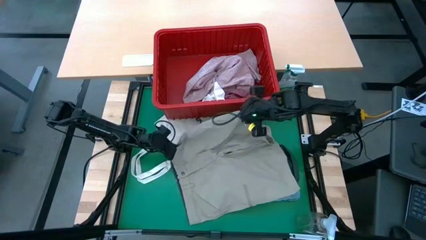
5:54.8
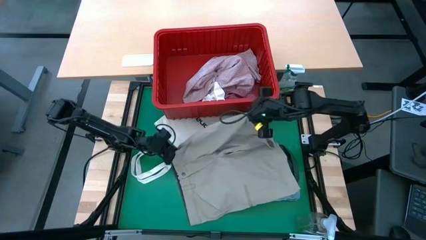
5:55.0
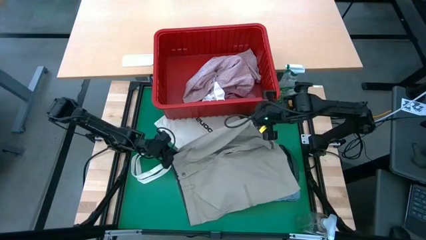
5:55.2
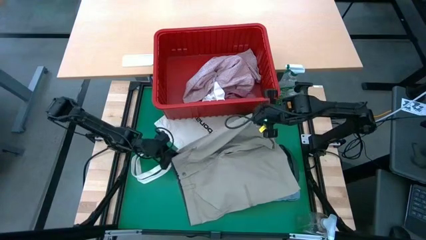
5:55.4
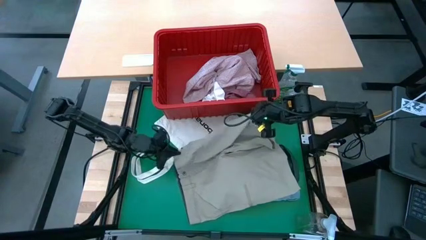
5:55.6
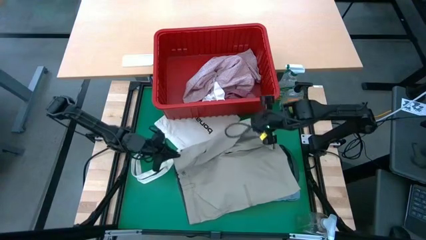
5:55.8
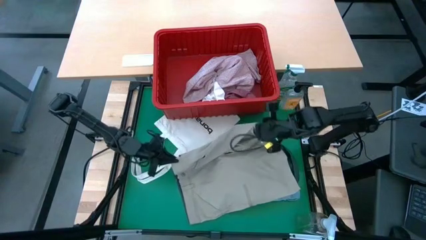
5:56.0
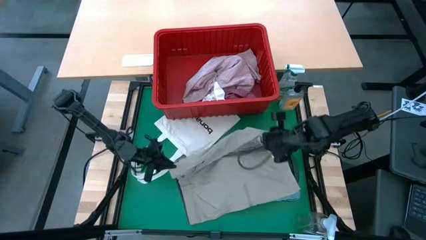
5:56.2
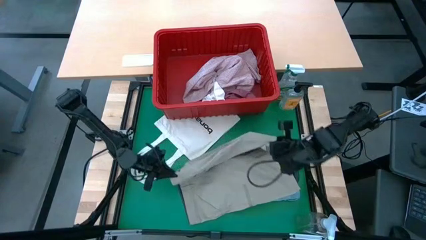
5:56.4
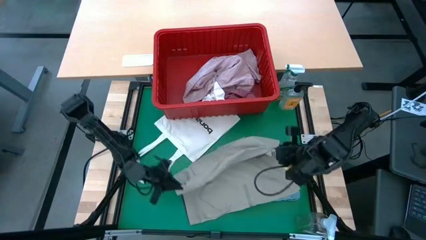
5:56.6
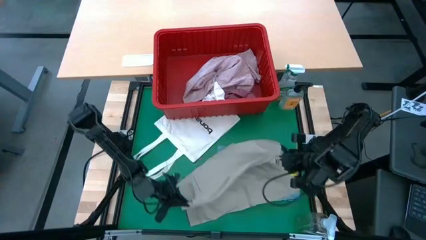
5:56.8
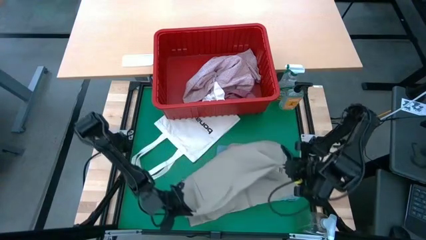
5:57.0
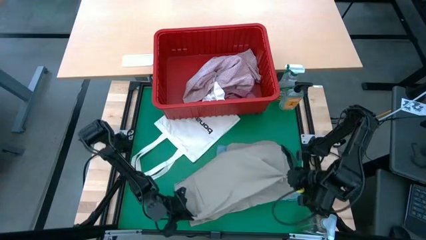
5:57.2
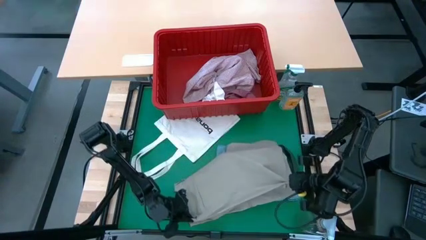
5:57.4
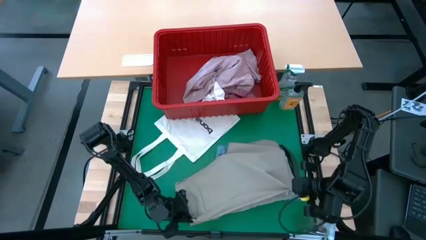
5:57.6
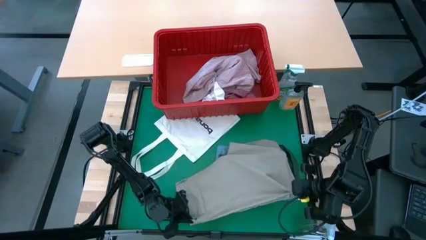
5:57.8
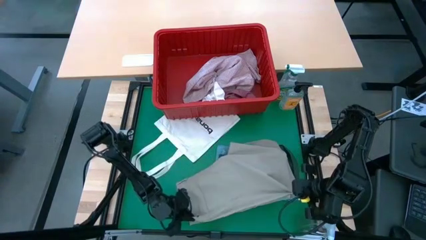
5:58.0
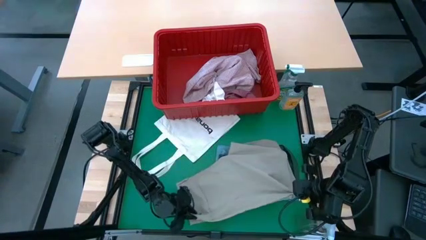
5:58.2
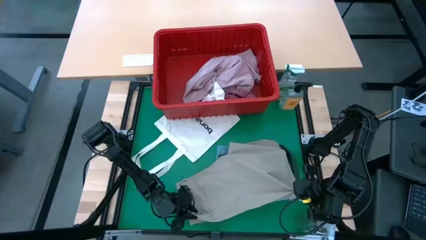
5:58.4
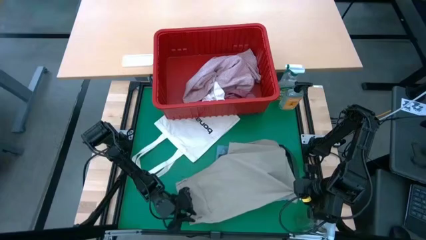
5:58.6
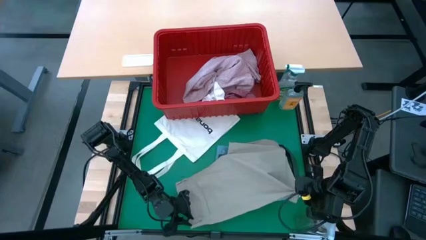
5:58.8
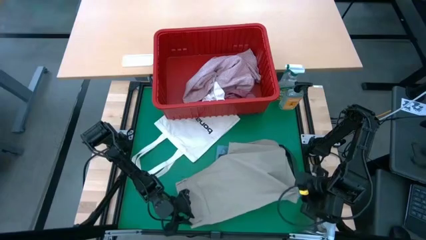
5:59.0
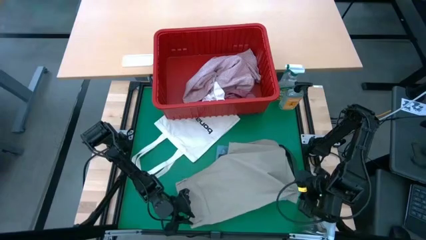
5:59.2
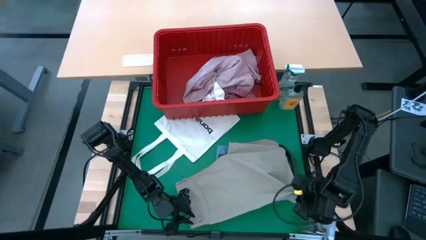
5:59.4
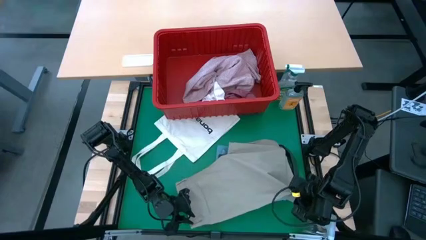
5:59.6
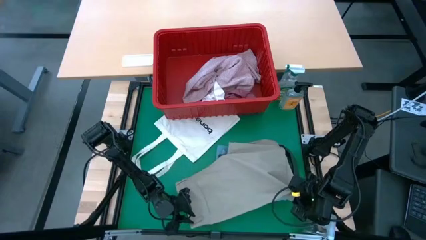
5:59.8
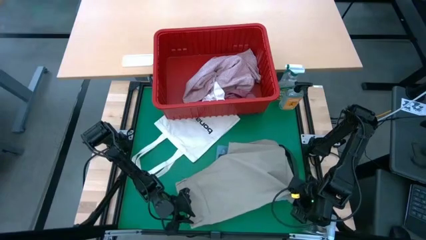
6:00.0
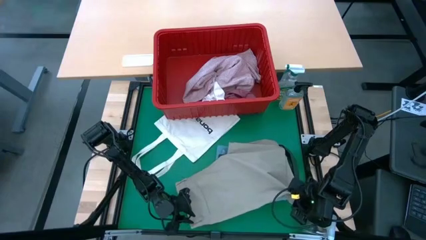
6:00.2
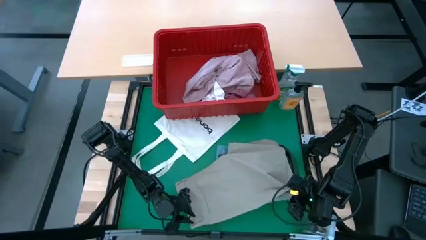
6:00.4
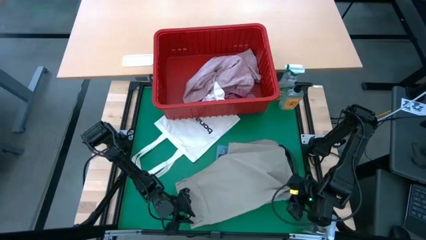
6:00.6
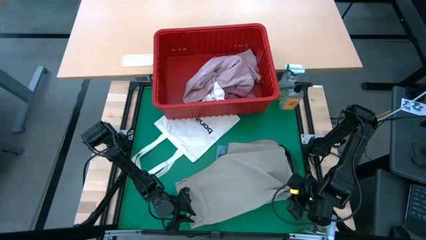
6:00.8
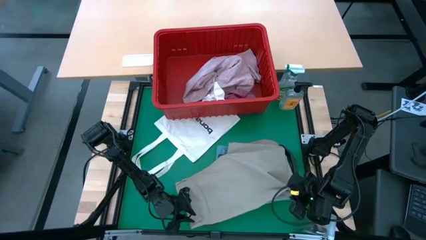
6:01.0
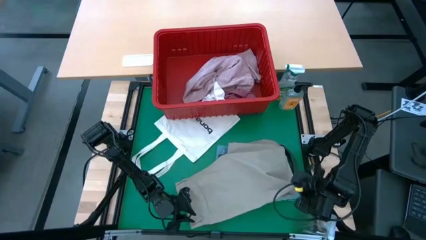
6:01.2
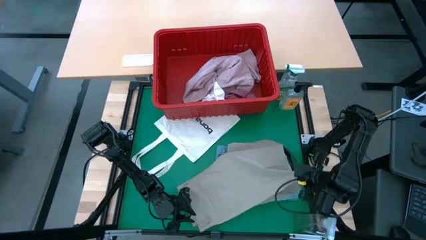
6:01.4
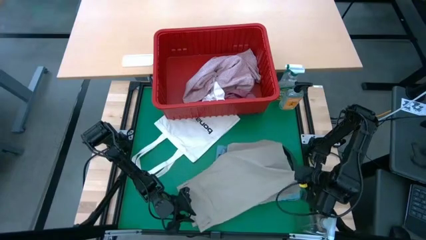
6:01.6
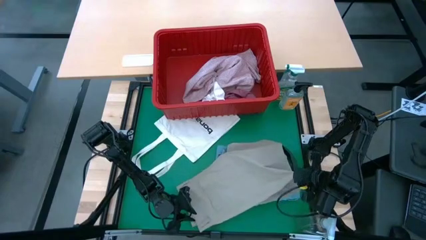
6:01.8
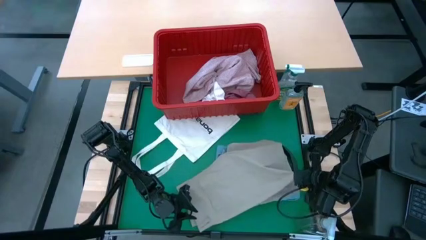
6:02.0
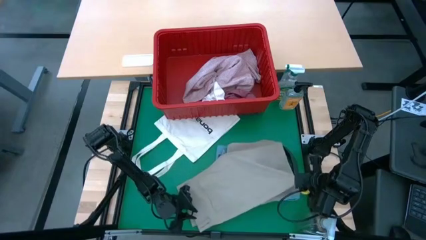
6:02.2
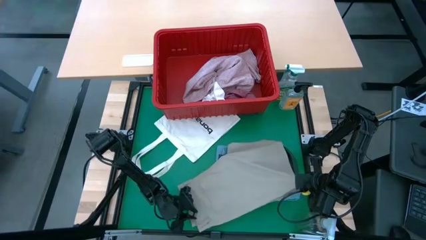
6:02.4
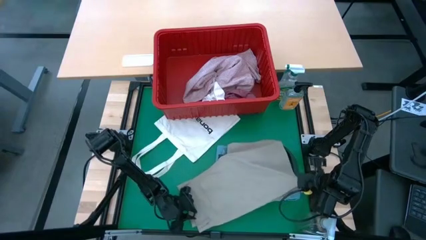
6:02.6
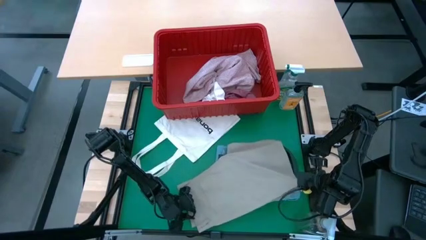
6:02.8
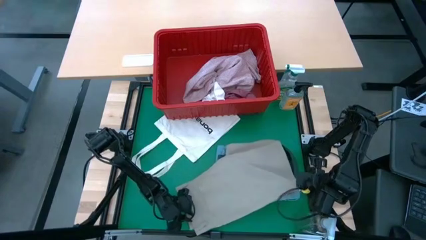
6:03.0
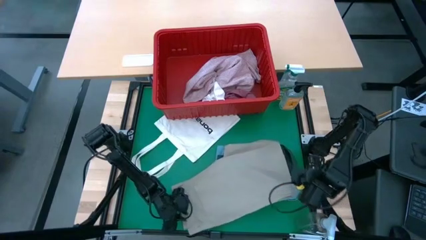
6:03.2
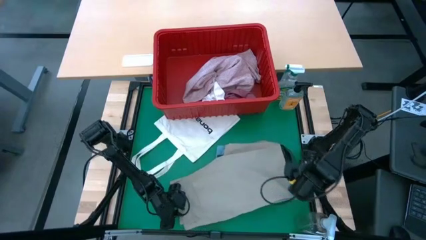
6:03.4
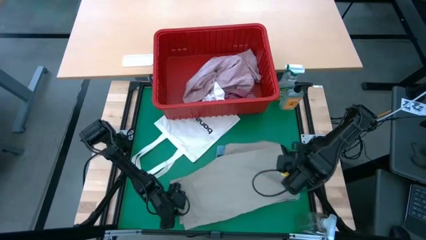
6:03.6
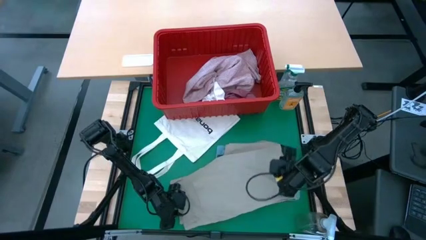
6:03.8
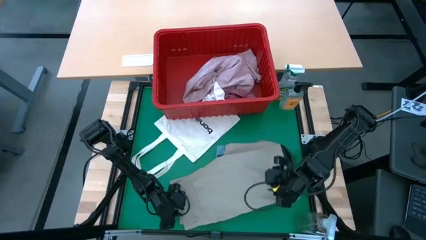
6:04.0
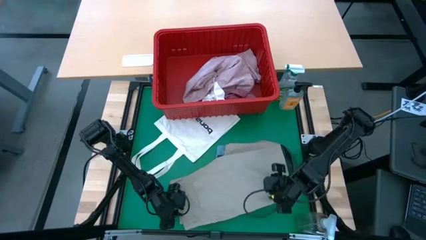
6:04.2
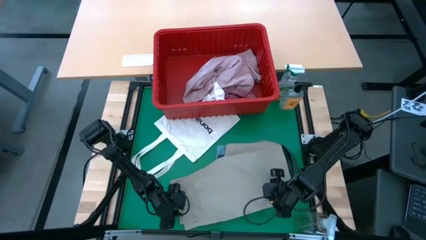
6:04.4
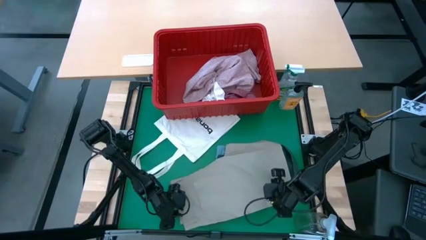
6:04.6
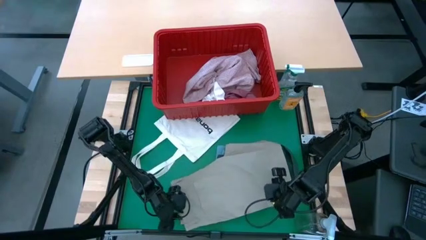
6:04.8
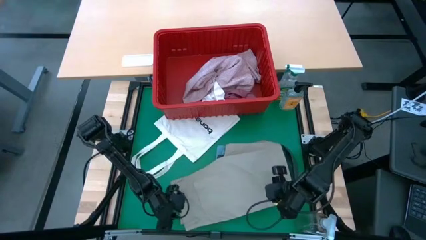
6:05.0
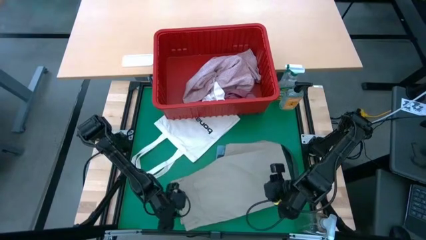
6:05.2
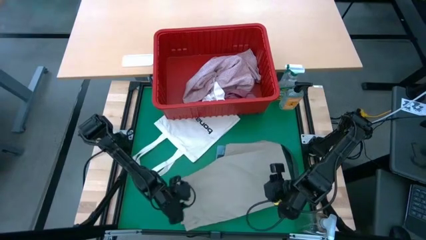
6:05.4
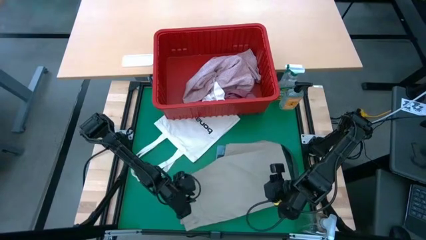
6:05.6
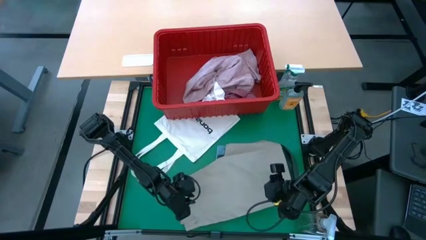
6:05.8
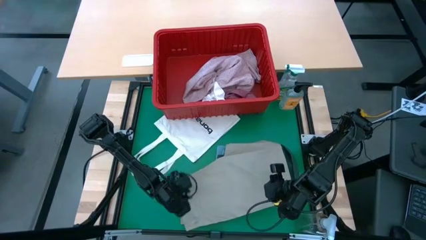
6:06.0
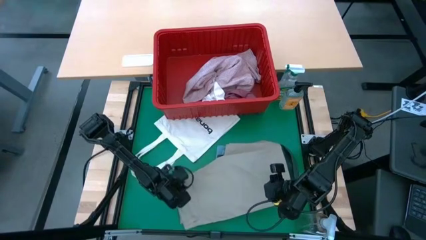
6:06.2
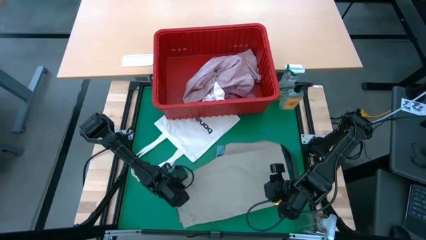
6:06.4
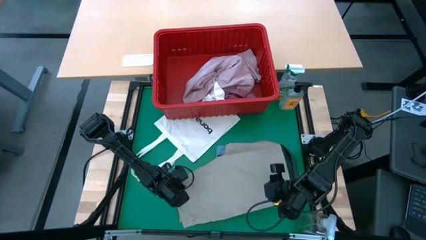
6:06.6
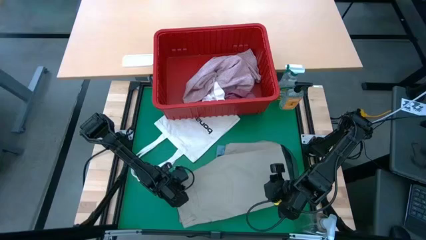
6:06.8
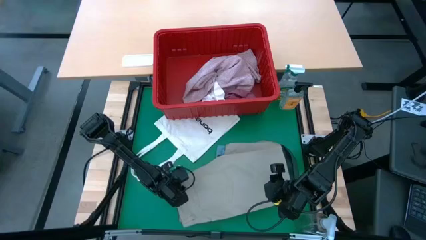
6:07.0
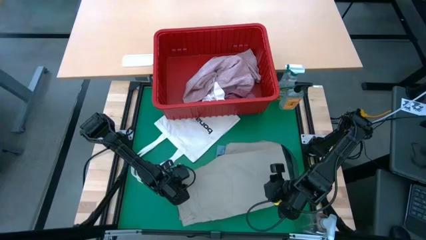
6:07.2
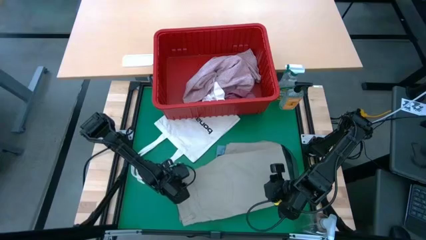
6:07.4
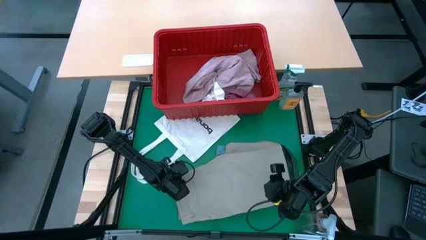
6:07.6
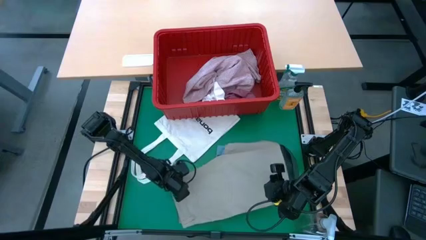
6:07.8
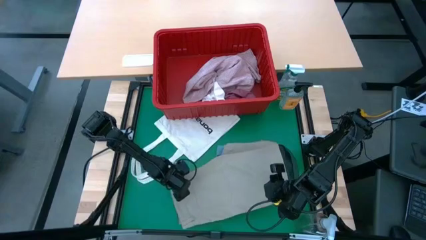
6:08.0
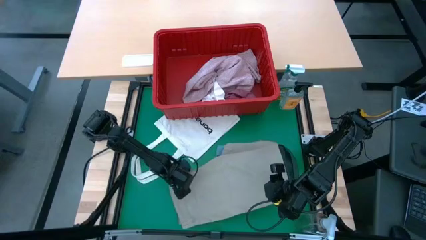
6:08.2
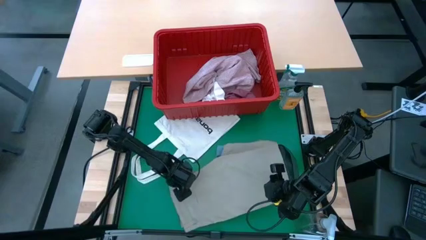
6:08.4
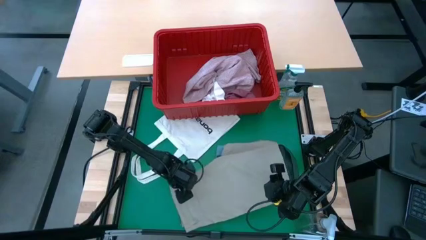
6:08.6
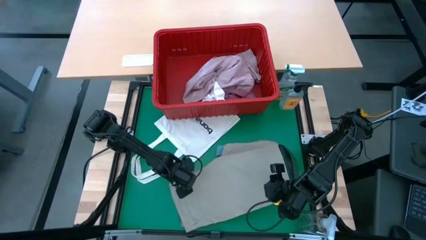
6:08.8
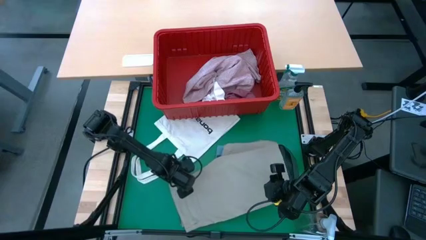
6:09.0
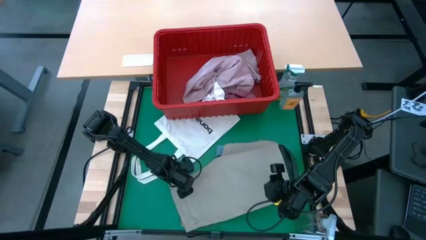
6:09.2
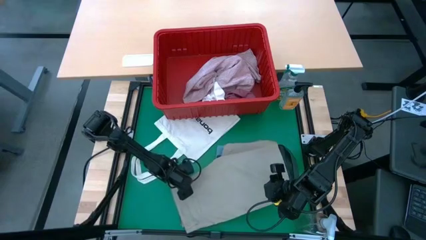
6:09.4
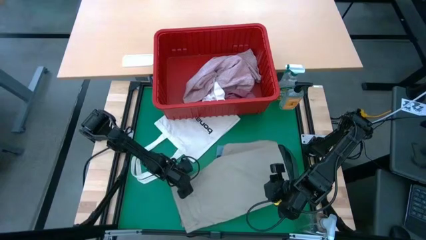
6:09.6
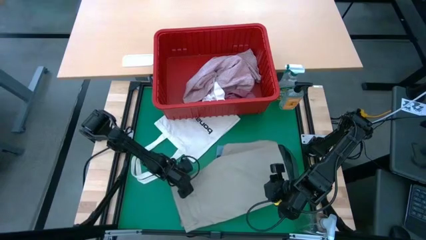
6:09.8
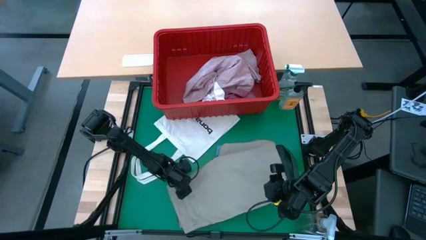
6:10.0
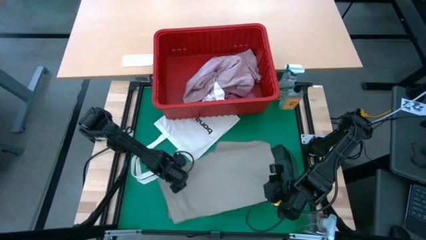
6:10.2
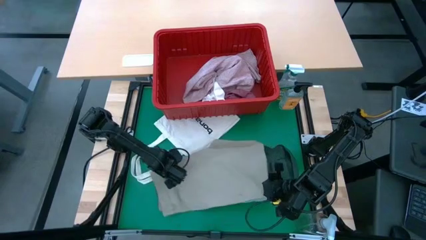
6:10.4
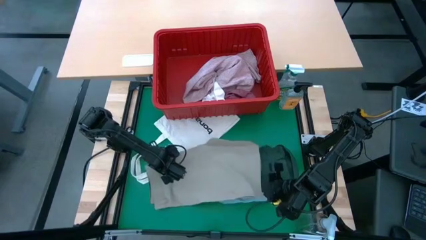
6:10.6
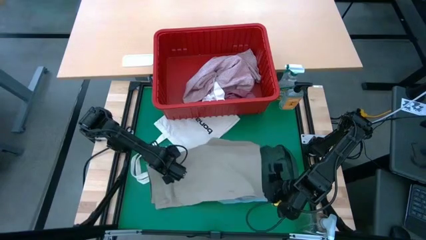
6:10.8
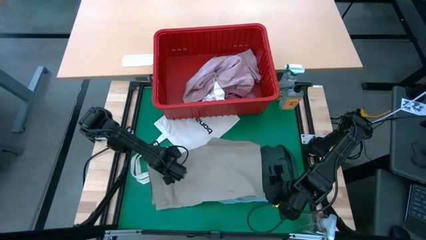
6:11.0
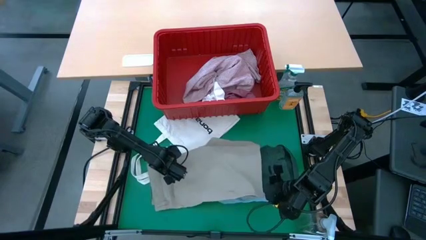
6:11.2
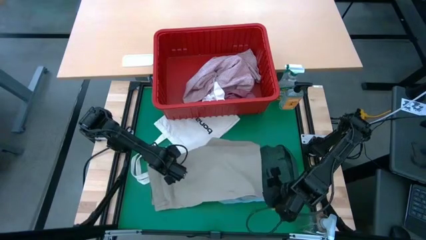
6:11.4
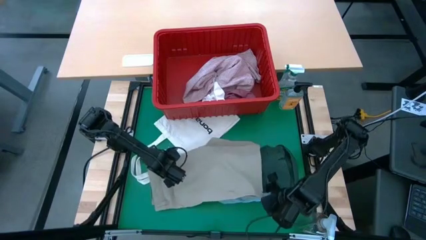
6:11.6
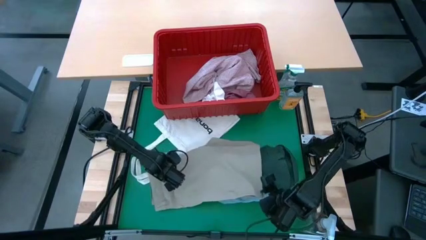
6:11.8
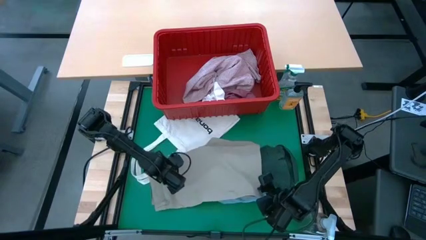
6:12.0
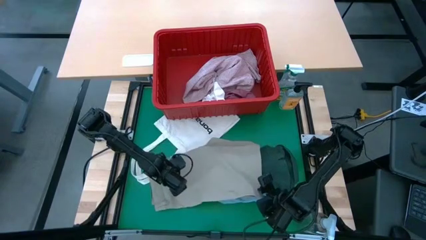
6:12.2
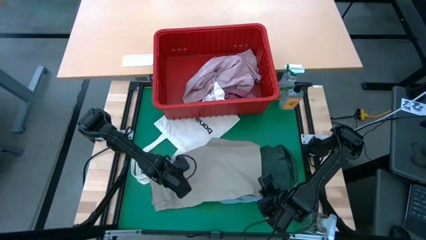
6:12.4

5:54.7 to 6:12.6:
Task: Fold laundry
Fold the gray shorts
